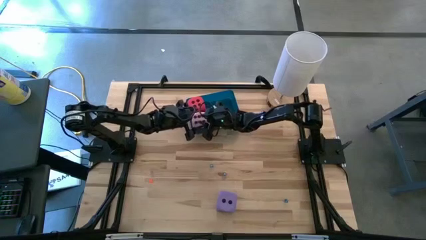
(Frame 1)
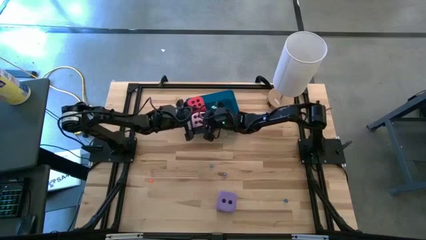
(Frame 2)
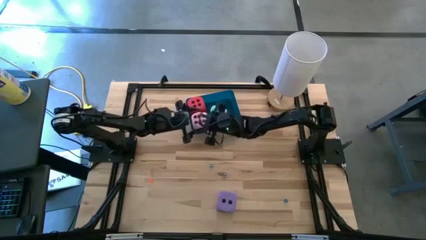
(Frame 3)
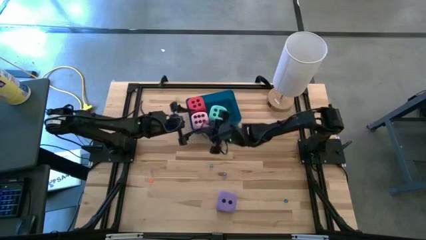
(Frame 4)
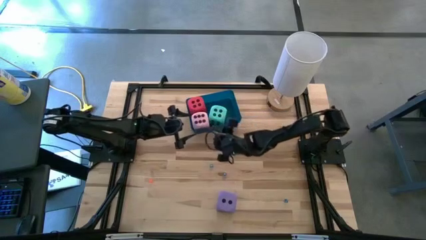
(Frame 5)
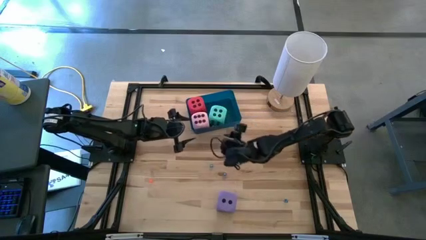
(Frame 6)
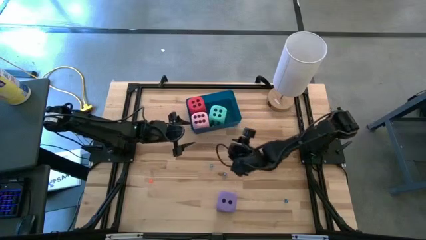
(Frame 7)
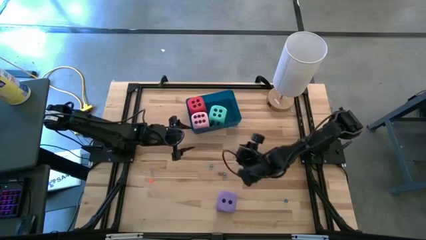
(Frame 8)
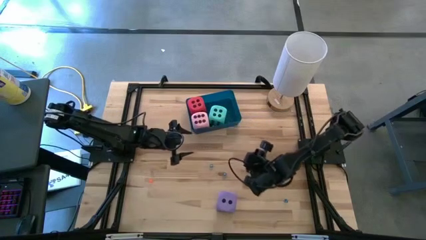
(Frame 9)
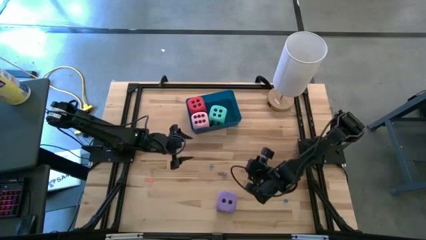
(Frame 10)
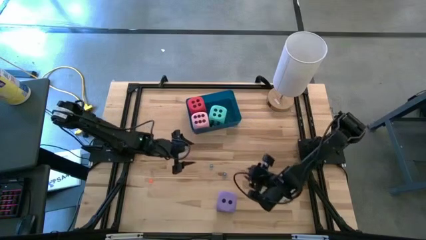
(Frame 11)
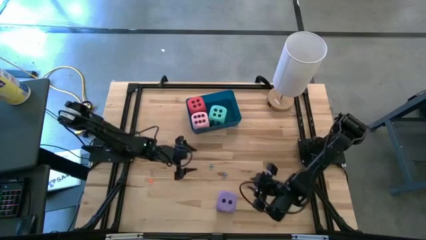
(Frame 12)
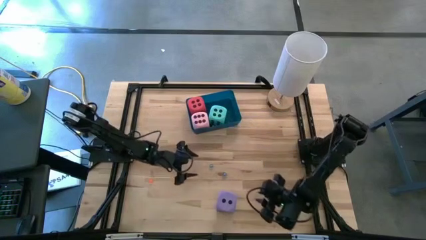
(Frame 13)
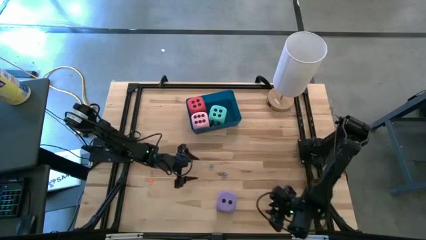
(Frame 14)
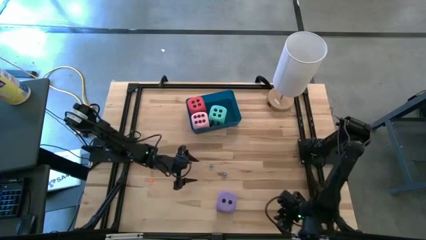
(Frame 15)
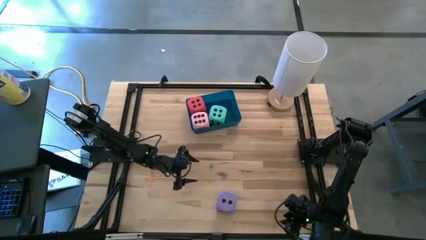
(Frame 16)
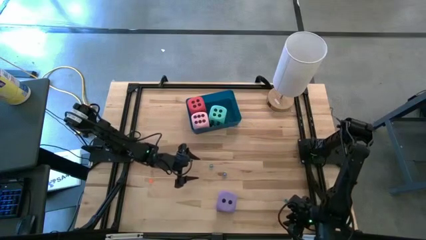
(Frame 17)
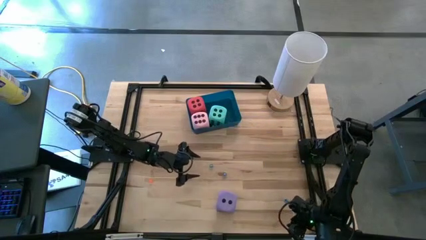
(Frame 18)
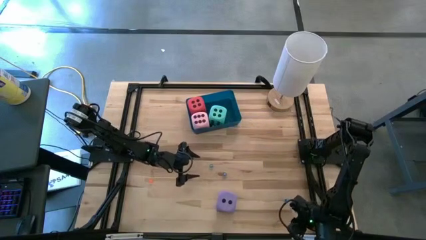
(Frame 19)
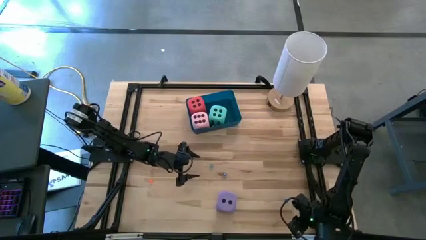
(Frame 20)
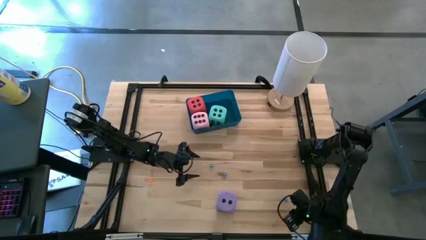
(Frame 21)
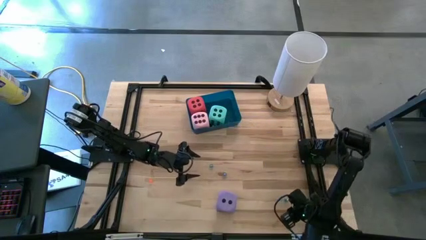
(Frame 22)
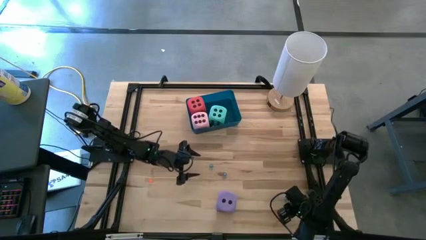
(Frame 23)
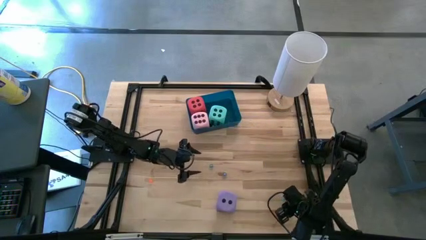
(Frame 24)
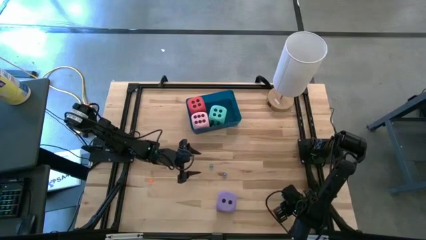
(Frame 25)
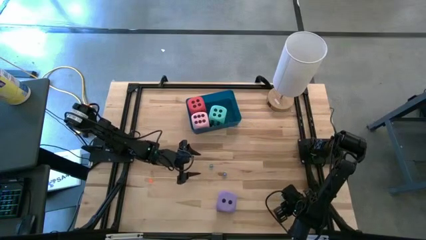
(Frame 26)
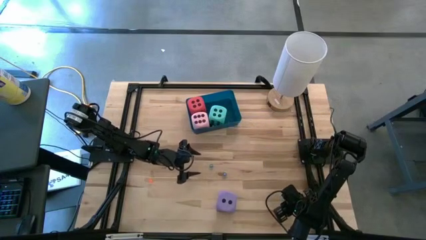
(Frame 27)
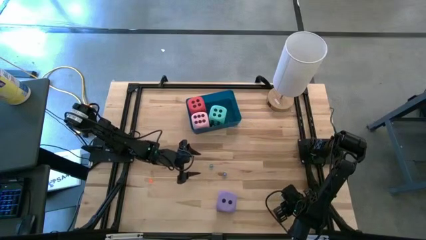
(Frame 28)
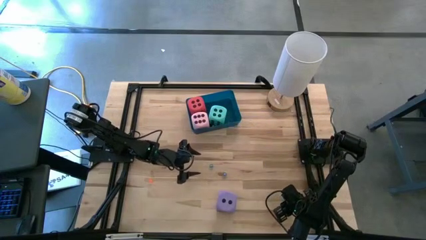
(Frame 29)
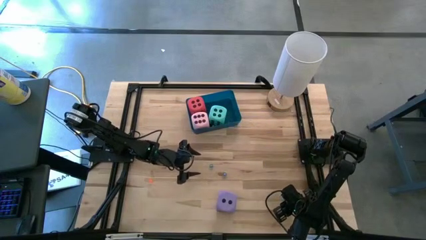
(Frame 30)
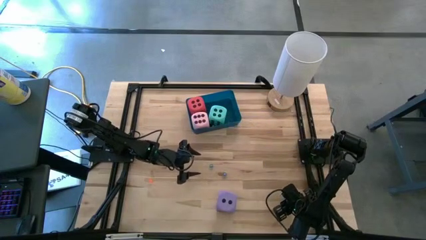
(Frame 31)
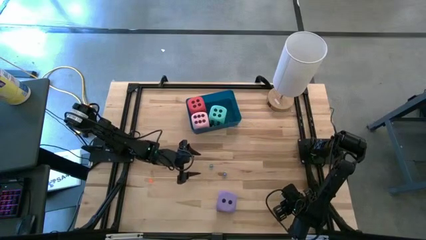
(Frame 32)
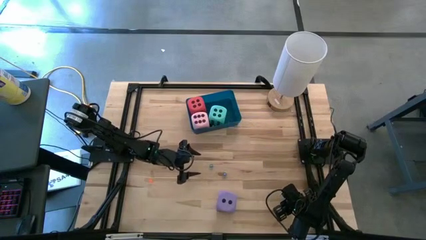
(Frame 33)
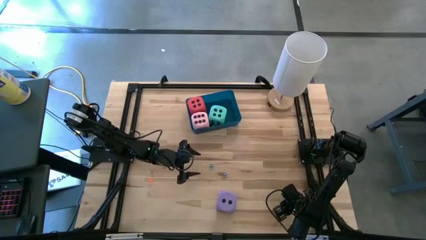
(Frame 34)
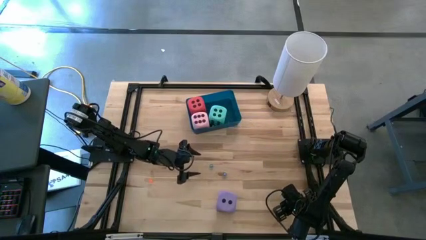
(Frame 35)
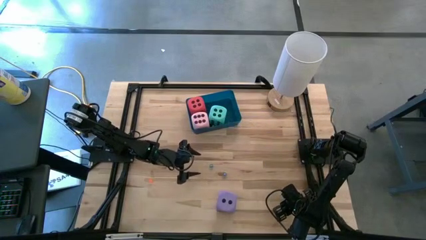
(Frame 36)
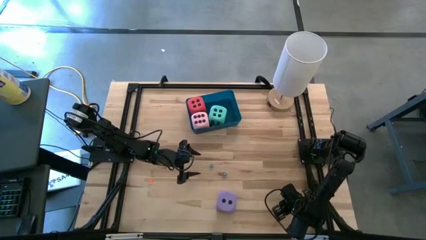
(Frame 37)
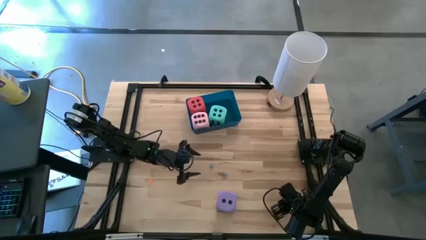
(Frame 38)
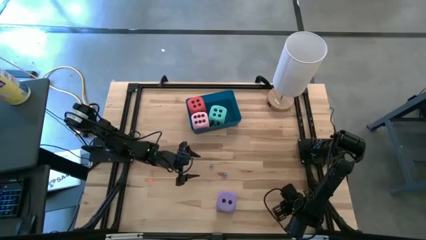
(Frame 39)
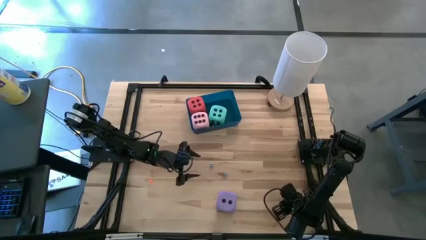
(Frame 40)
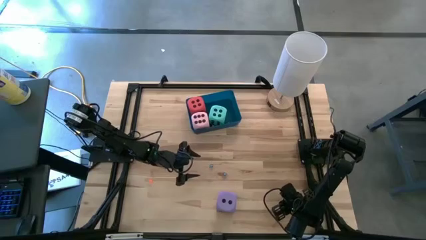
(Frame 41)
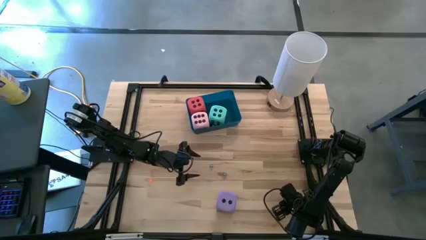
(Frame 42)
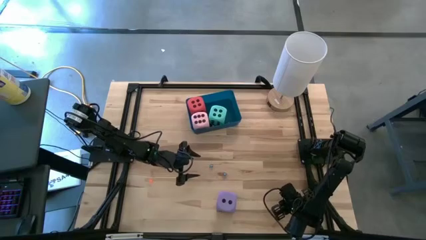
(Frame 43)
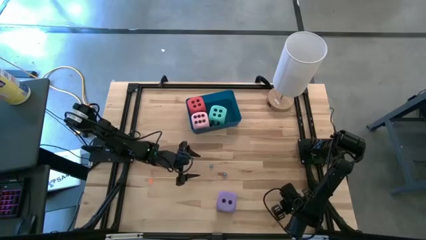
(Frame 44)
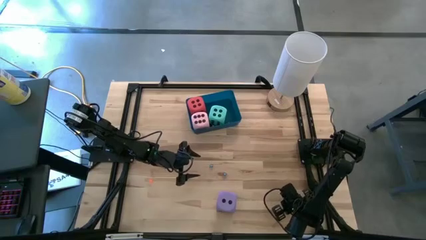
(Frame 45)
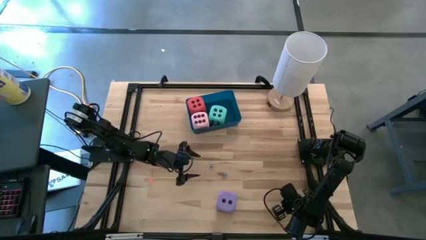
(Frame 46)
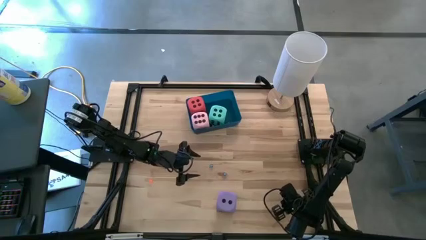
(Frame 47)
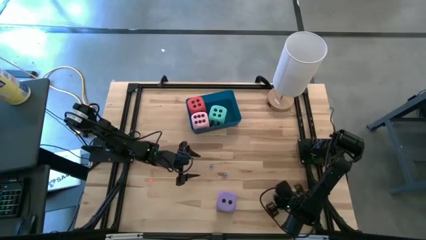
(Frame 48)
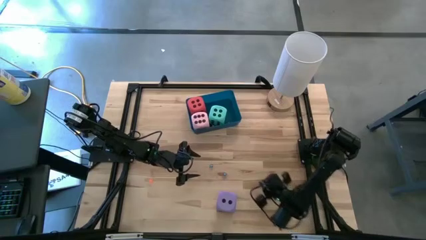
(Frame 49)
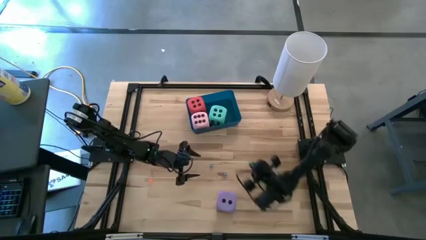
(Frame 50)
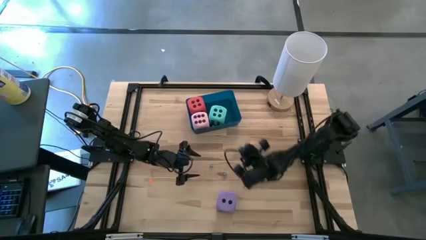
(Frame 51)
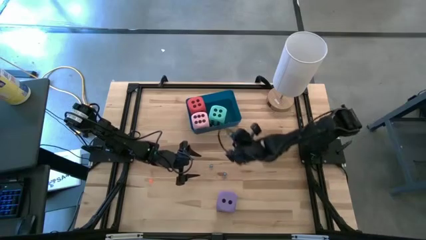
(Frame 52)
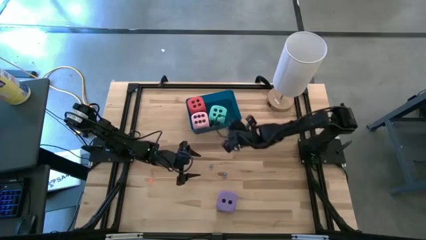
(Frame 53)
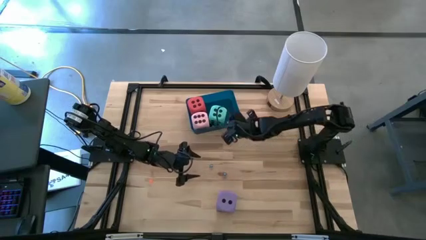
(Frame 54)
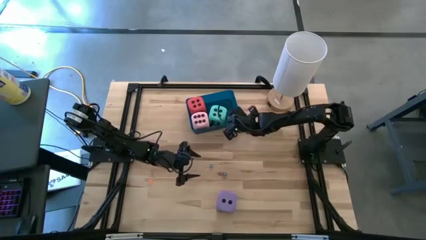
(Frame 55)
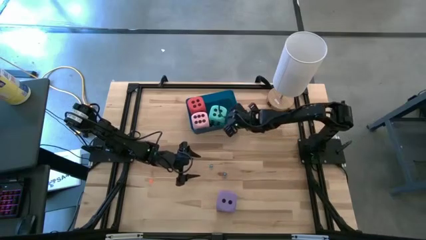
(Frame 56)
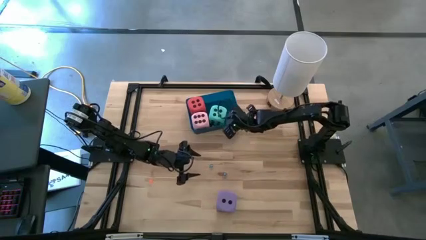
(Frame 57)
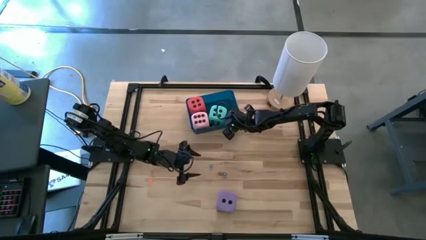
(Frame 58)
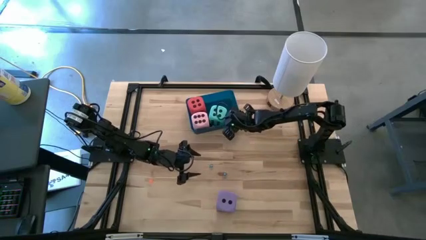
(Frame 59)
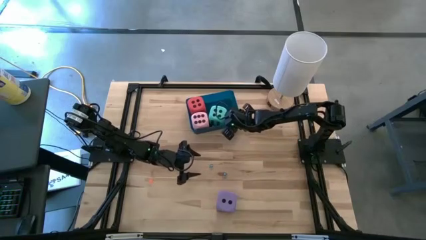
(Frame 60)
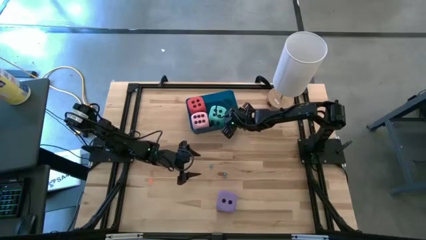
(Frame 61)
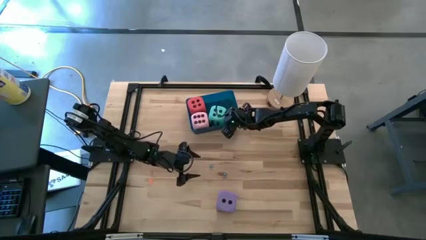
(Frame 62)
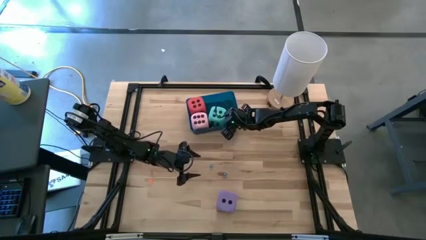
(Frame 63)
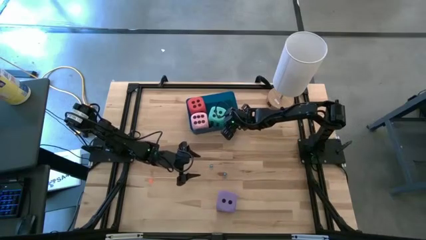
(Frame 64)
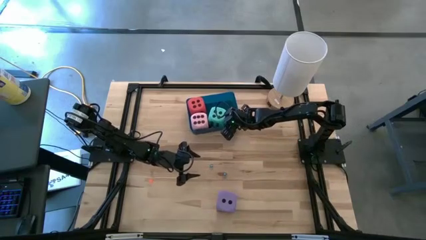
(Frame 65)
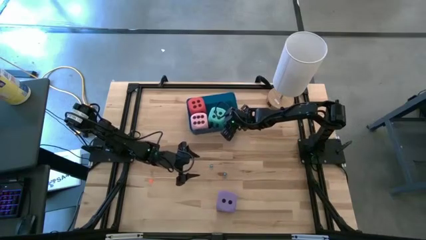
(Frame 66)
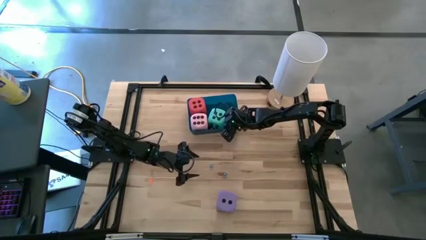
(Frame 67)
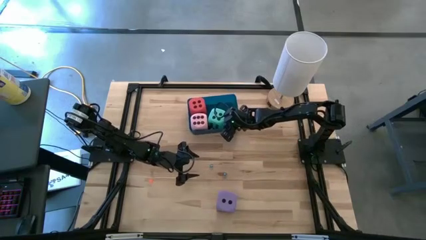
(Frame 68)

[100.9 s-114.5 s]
Task: Pick & Place Dice
Put the small blue dice into the blue bin

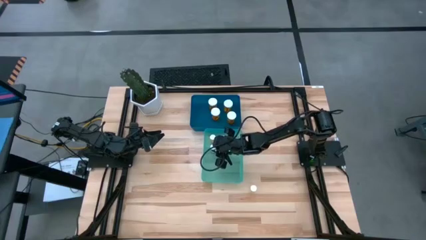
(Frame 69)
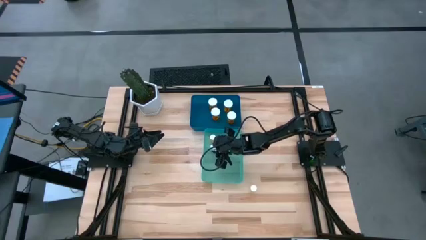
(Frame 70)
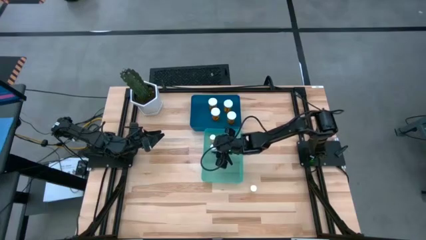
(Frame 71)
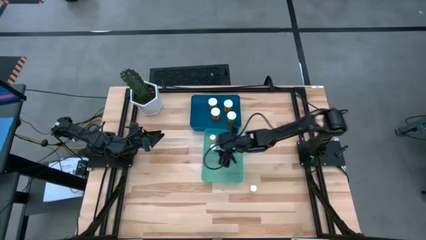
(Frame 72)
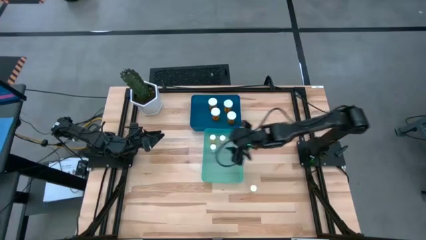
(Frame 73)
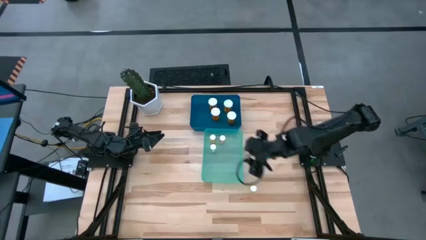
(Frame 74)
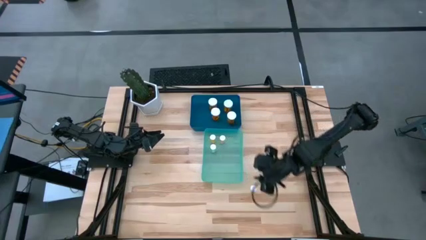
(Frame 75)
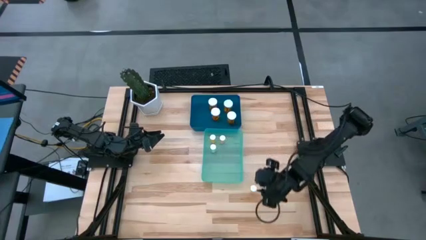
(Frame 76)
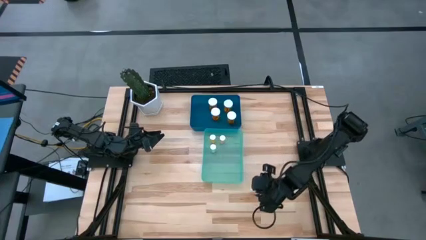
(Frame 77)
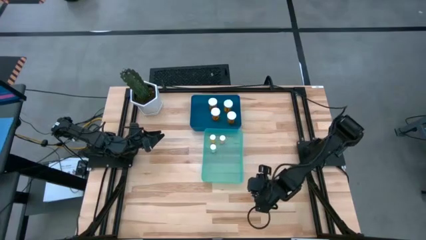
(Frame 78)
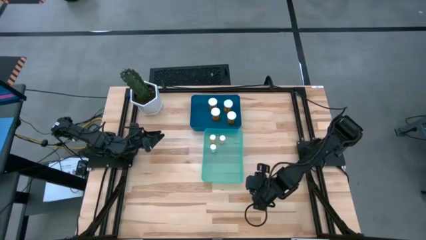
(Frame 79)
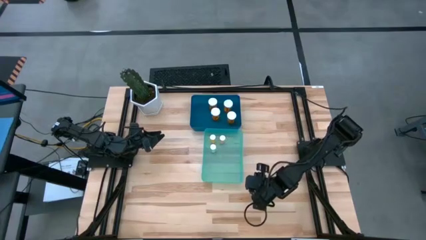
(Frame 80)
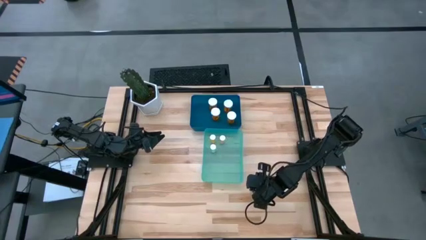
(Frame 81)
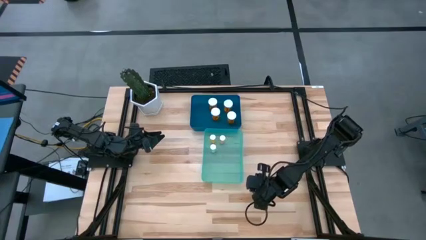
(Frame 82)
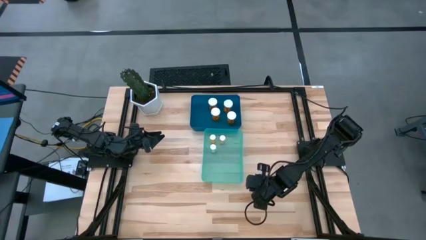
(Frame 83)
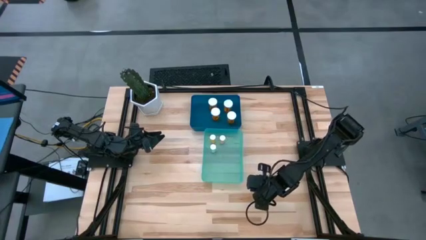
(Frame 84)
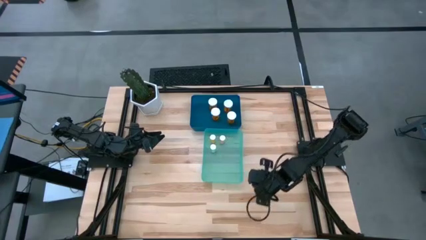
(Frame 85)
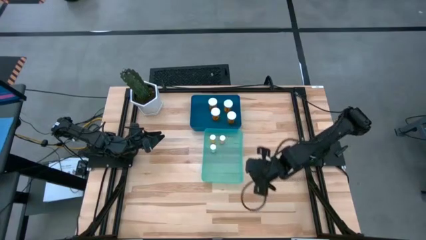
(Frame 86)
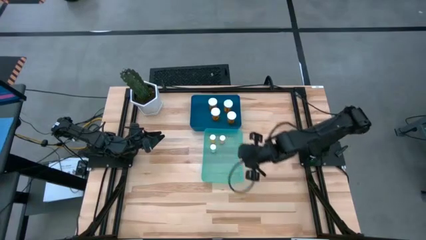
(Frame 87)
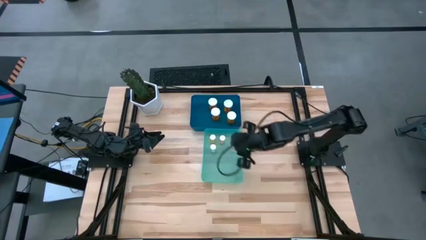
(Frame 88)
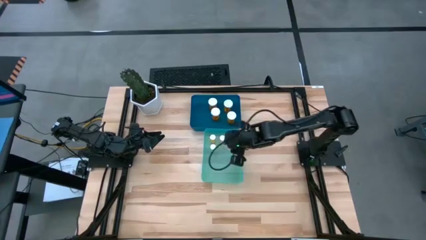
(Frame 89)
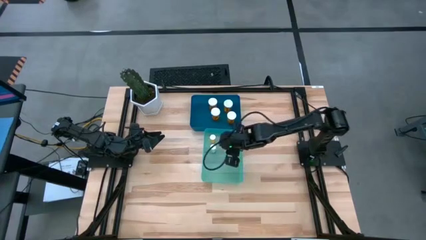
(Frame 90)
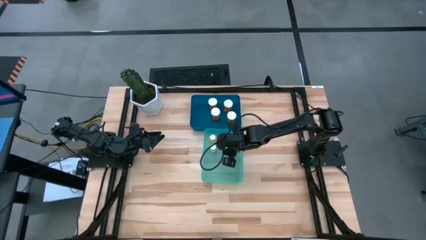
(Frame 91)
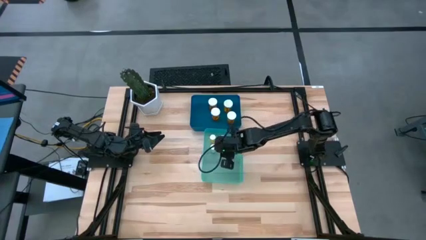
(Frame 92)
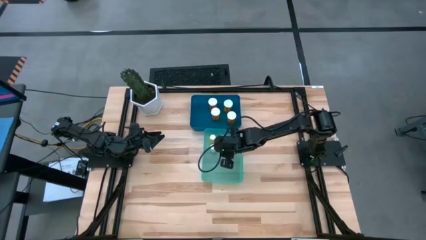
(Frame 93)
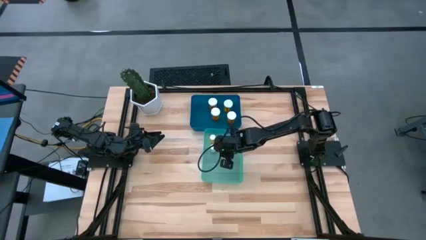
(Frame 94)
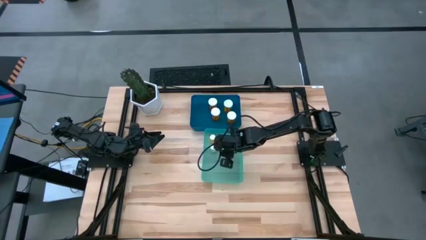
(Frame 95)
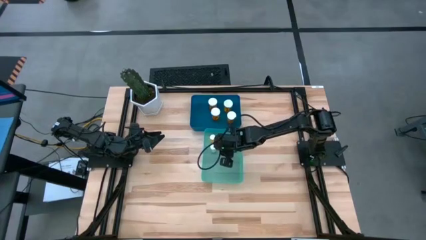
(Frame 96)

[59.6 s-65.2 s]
Task: Pick and place medicine bottles into bin by pill shape (circle, oval)
Put the small yellow pill bottle into the green bin
